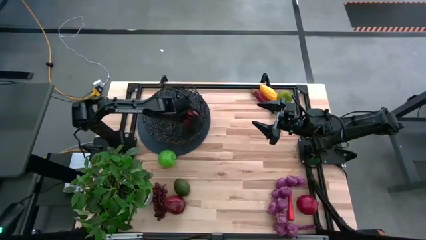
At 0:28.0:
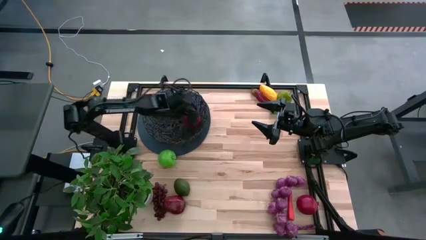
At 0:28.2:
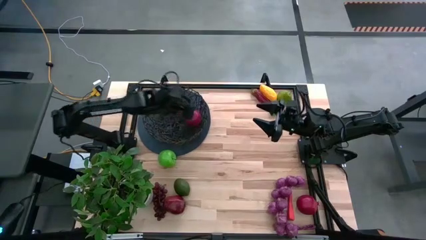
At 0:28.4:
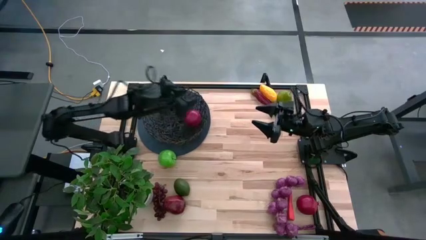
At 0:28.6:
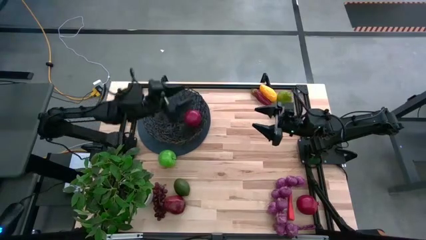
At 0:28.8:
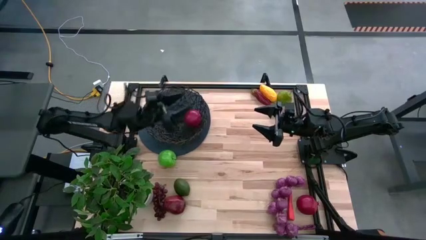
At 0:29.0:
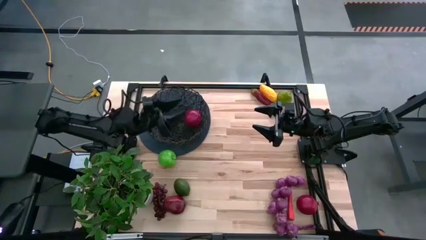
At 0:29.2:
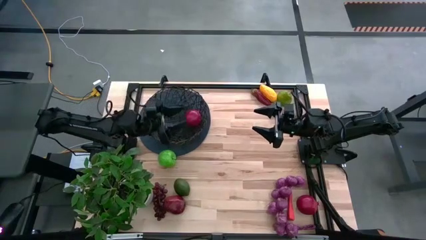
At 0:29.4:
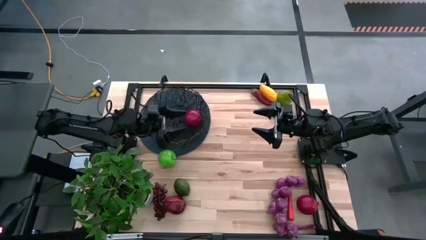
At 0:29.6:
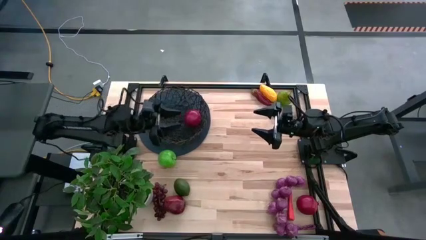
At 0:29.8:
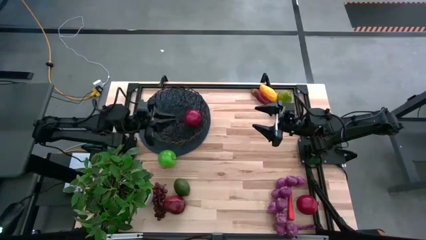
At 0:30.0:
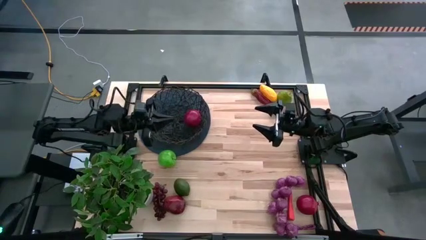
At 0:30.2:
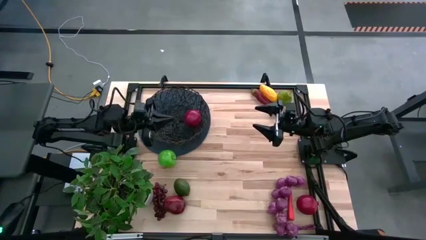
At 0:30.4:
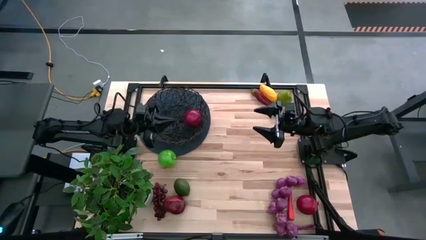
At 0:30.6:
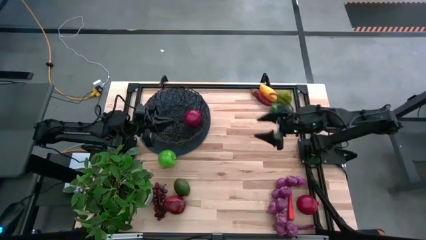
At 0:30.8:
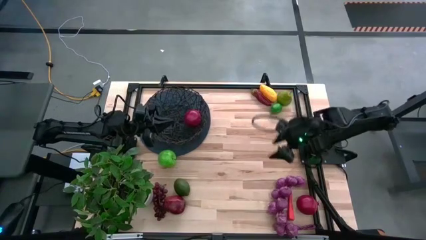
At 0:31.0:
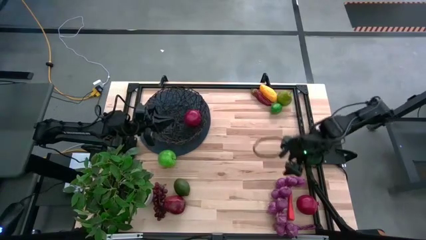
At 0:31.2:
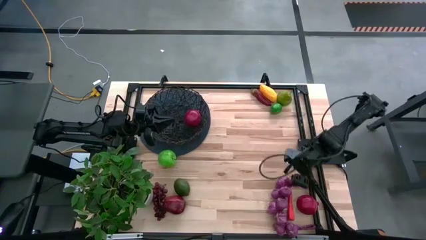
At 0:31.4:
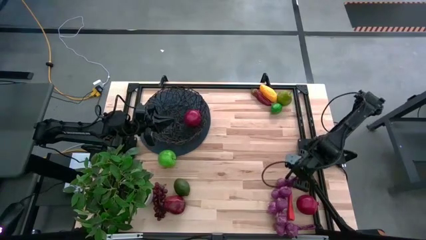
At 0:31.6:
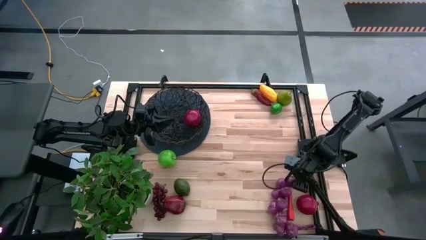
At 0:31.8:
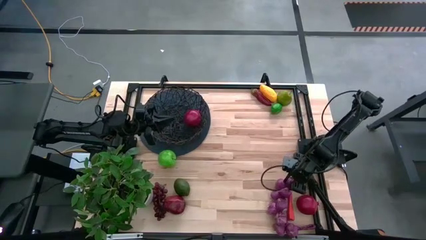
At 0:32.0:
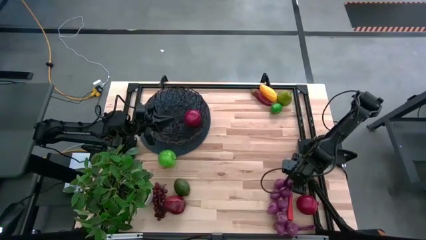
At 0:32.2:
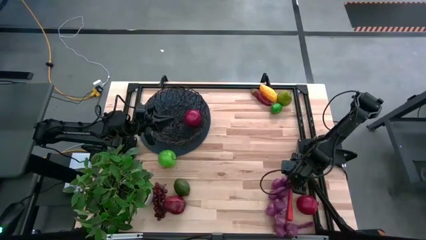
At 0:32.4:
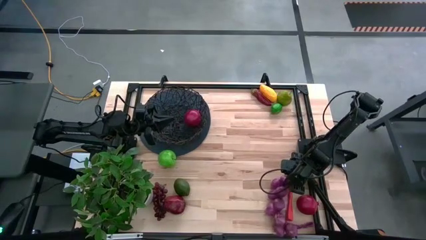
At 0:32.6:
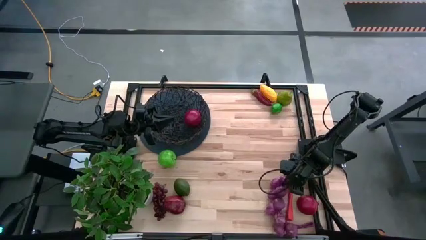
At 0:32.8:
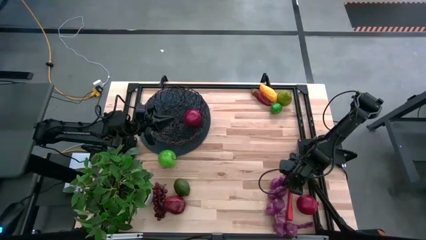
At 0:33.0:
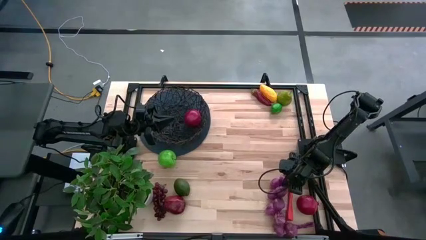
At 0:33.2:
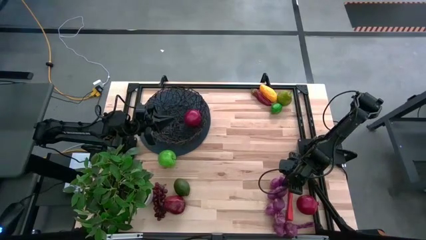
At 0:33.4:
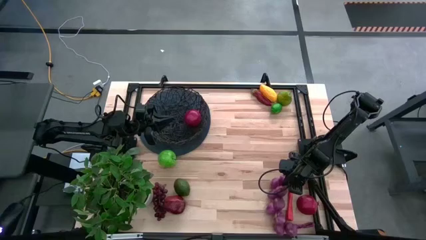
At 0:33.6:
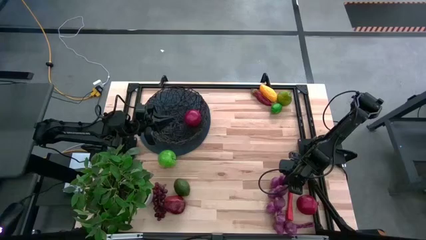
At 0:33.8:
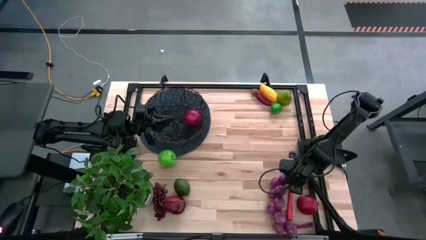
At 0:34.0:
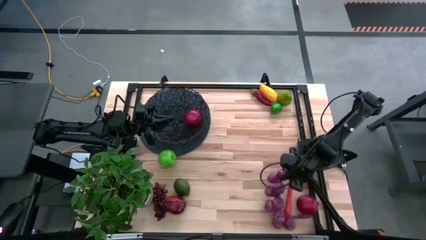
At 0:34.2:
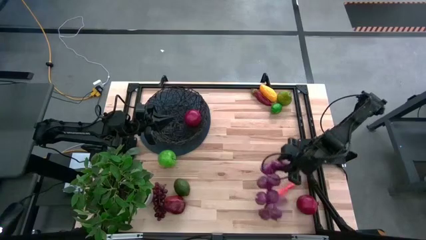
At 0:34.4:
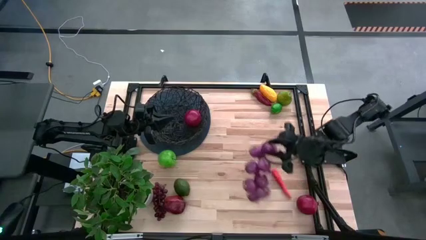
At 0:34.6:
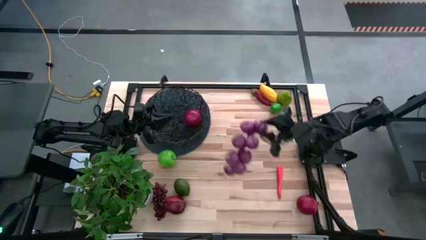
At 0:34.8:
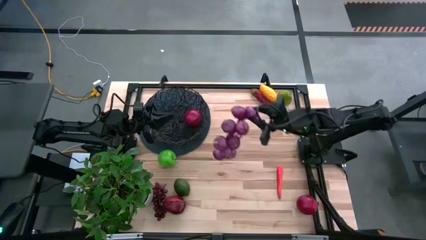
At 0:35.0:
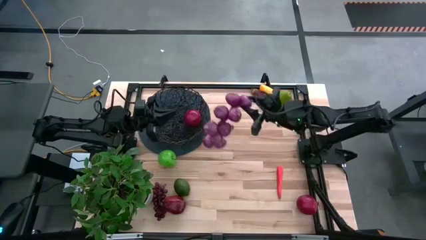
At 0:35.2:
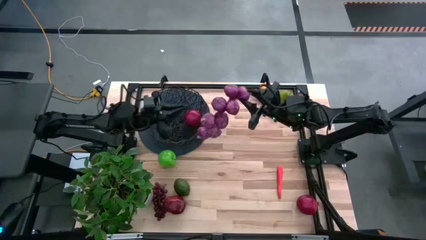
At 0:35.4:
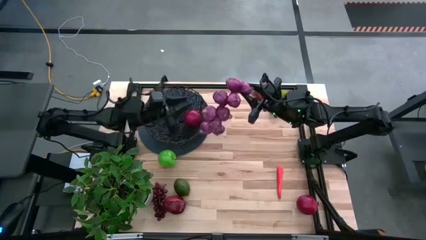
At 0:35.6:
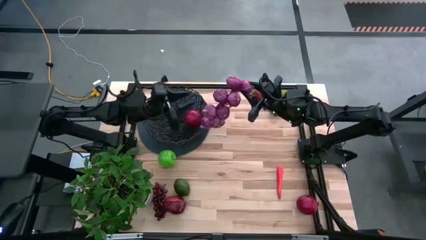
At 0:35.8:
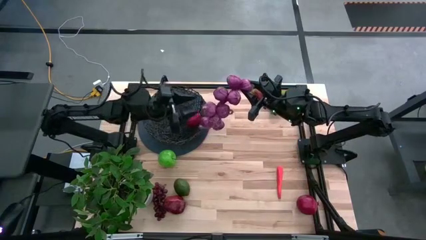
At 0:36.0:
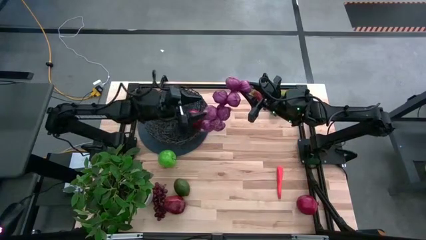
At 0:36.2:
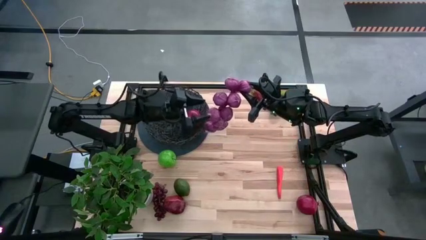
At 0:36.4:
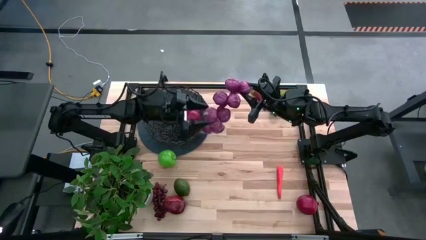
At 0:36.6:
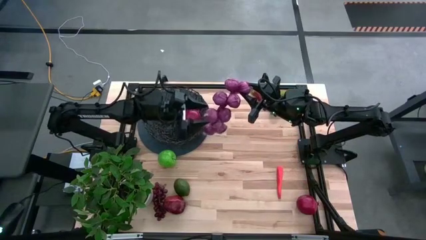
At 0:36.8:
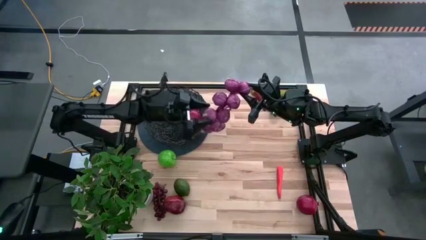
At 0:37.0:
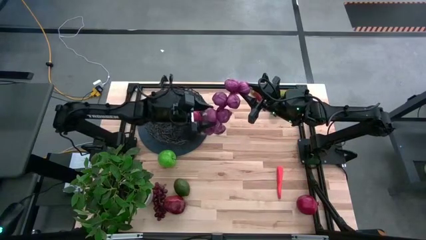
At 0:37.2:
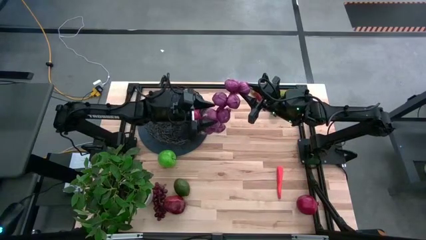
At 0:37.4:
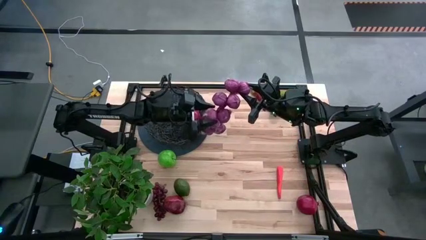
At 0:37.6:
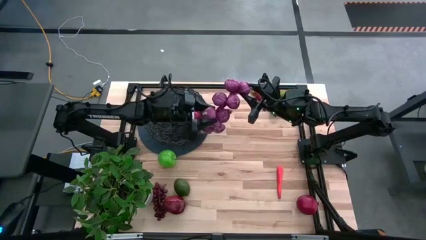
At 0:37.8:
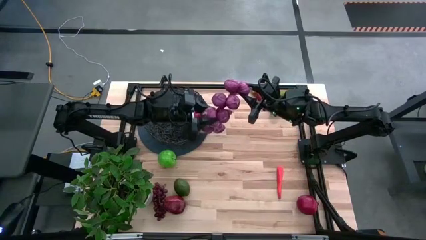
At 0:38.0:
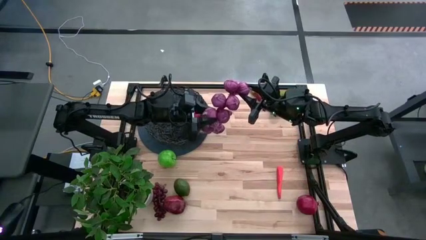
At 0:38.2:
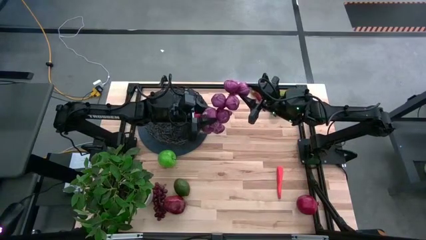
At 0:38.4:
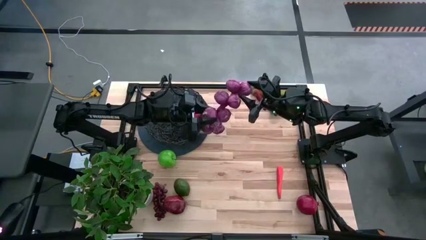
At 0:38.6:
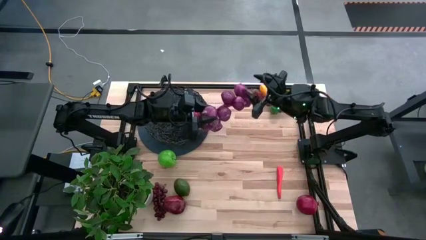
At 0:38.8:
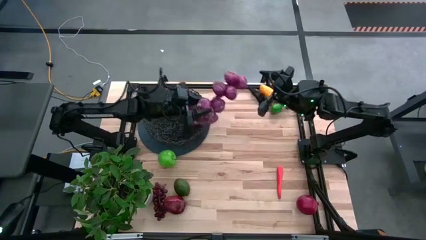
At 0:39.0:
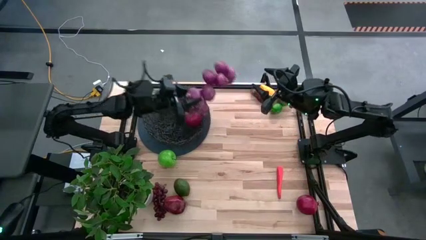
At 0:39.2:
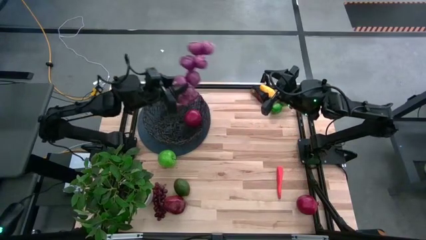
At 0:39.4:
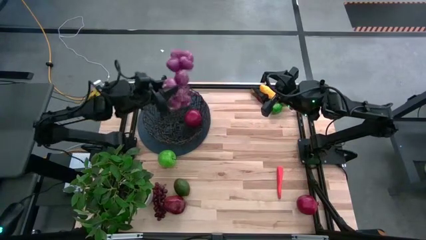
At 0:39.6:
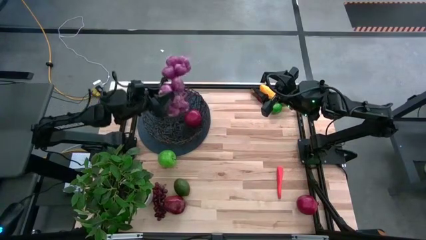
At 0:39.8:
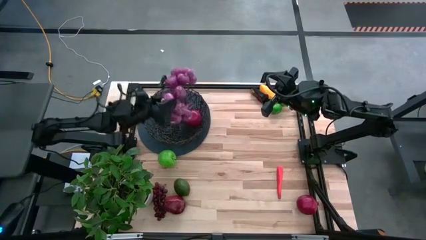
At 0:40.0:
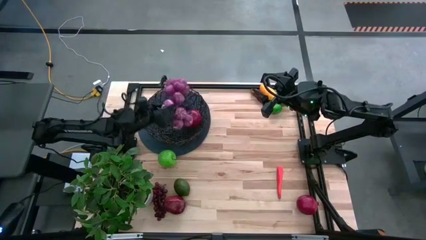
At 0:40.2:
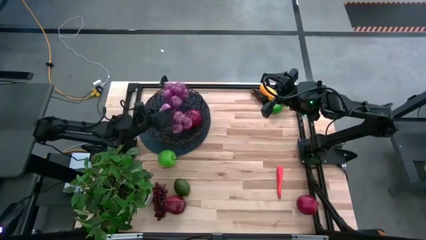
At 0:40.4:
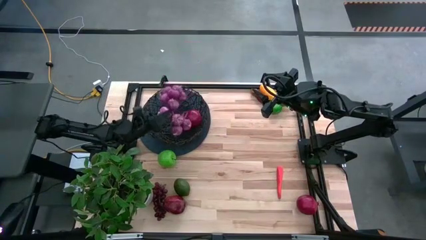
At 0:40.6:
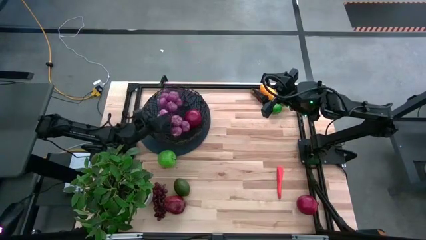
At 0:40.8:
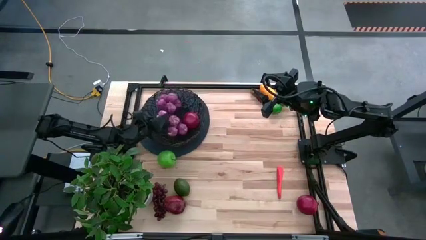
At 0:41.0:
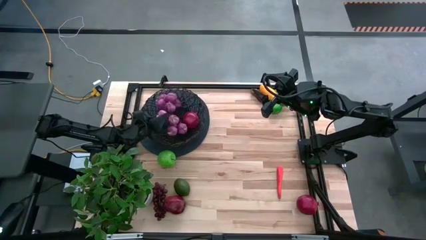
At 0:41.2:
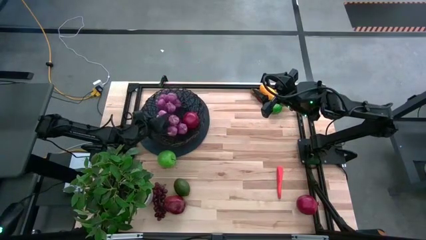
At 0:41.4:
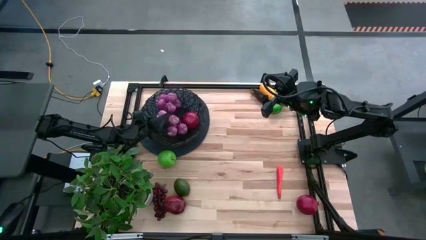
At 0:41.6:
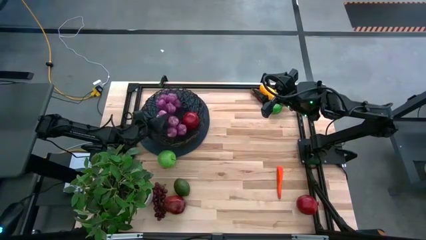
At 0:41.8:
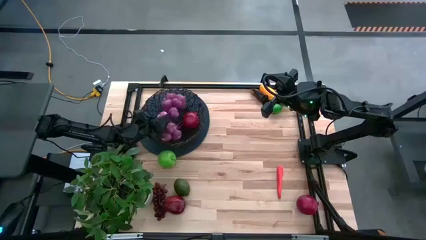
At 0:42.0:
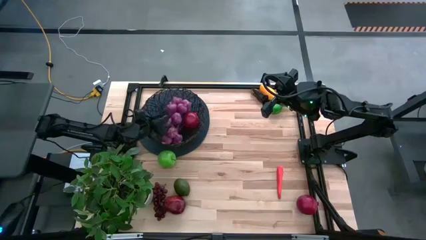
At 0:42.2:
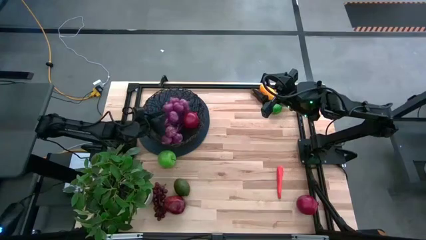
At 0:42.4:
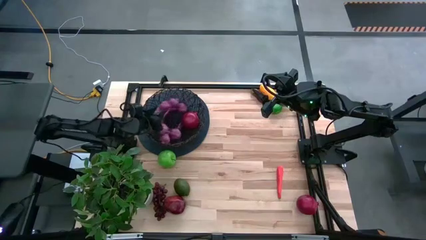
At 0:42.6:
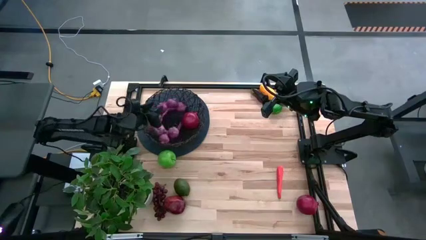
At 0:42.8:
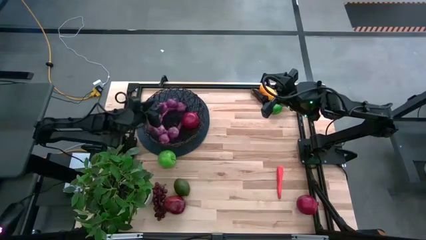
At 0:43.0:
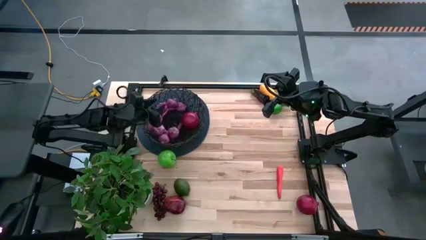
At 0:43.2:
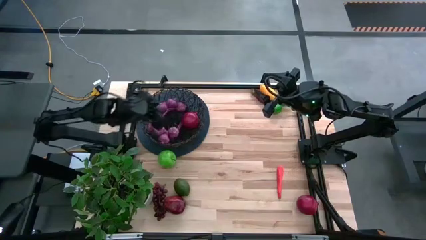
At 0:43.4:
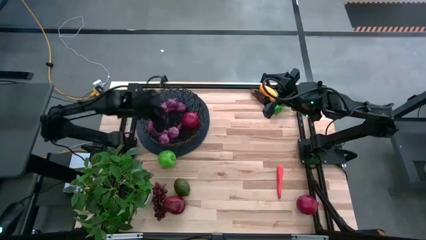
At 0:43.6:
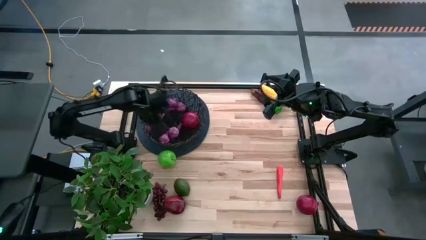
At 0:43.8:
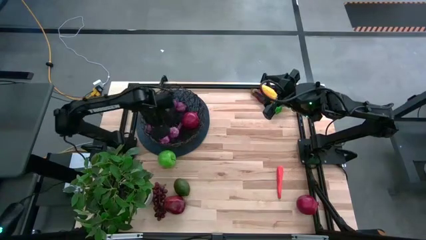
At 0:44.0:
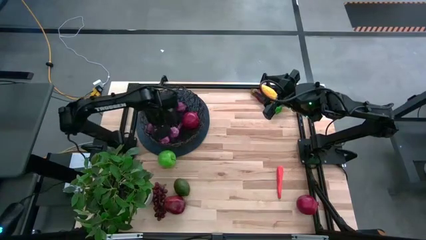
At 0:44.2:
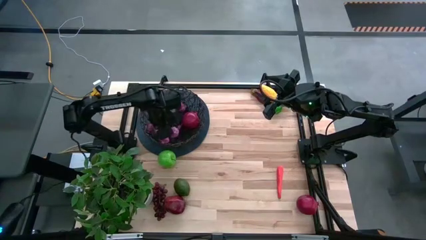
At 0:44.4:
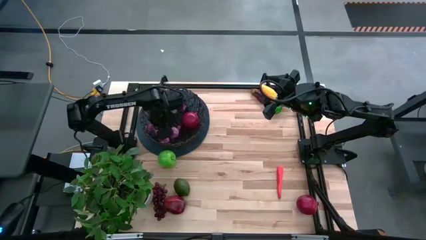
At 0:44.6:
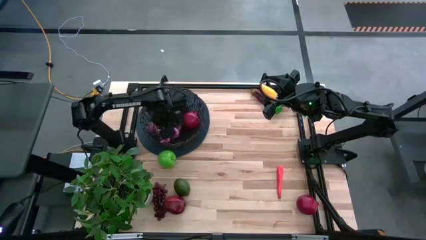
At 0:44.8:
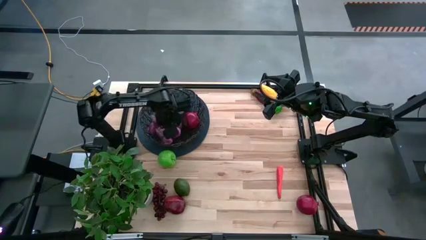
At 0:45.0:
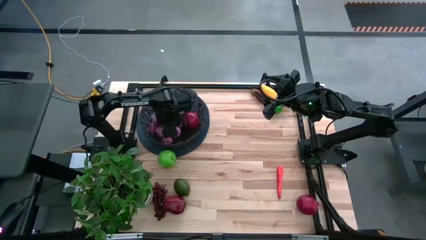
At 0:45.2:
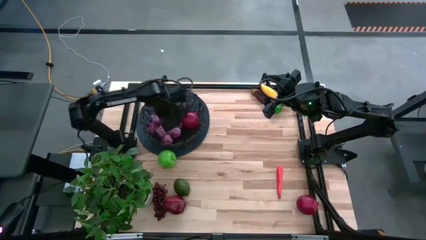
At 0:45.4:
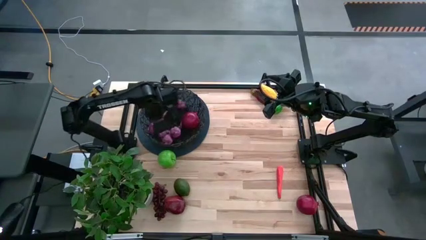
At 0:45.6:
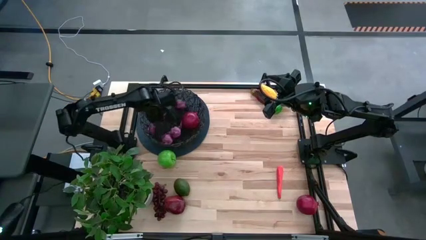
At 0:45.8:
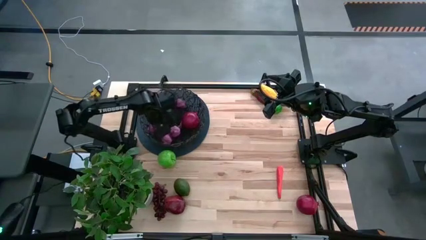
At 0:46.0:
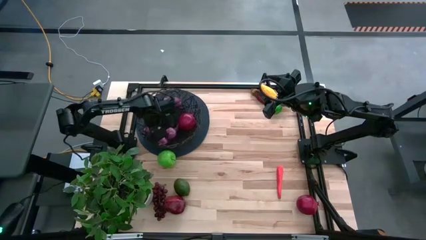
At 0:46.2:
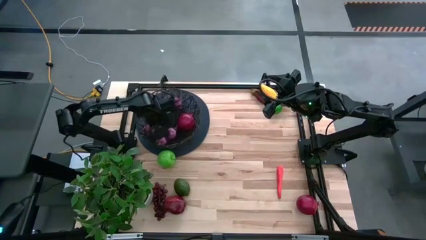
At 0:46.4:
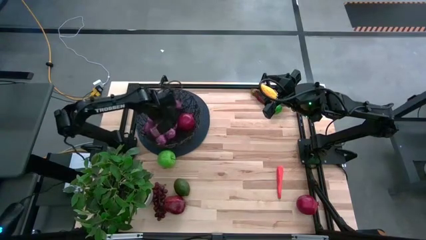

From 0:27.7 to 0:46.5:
Task: Build produce basket
Put the purple garlic into the wire basket
